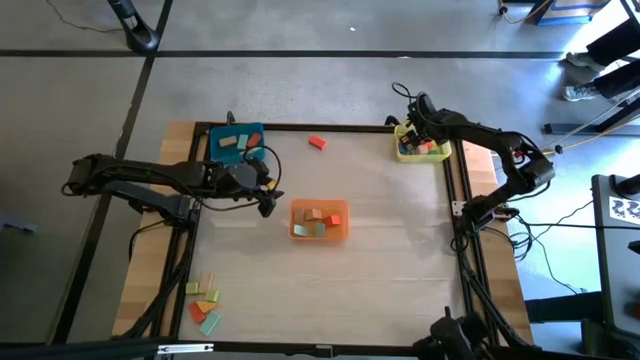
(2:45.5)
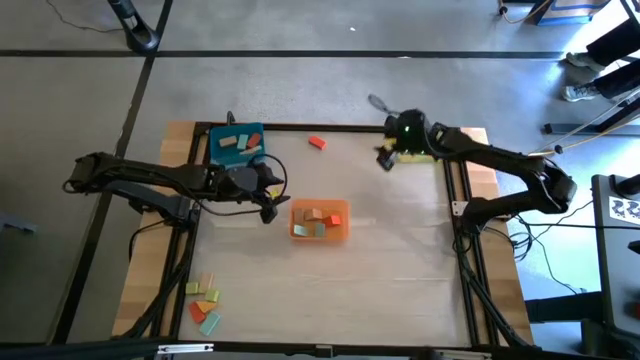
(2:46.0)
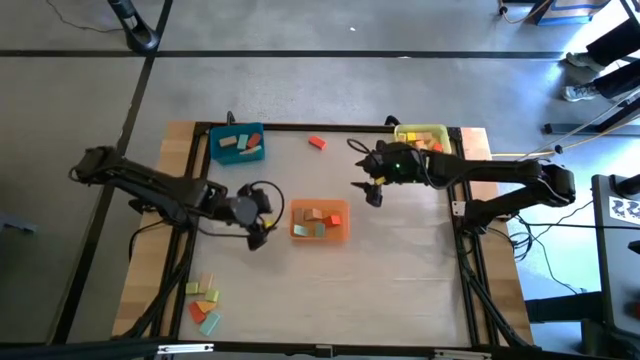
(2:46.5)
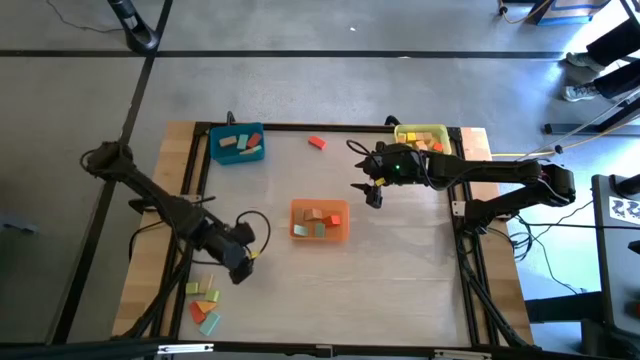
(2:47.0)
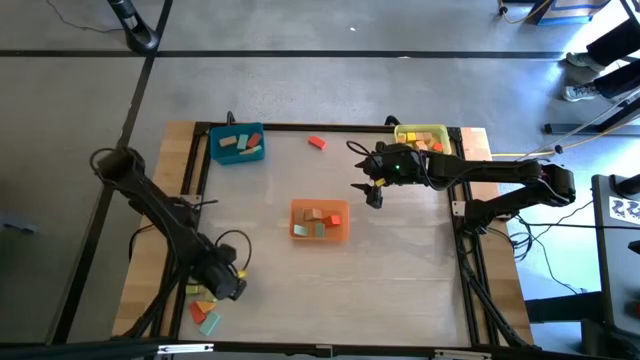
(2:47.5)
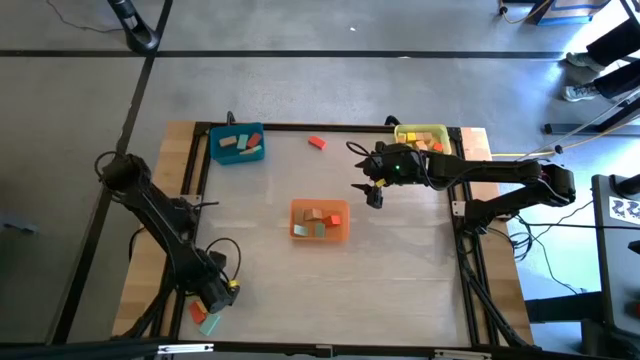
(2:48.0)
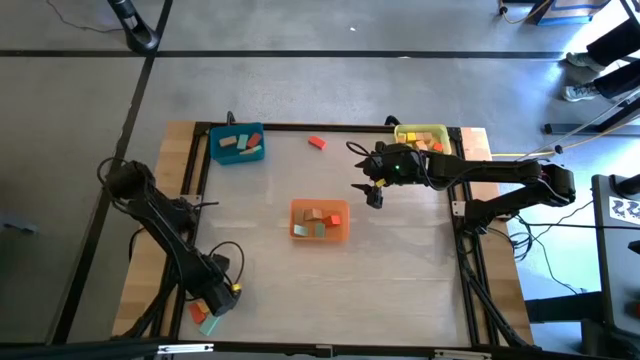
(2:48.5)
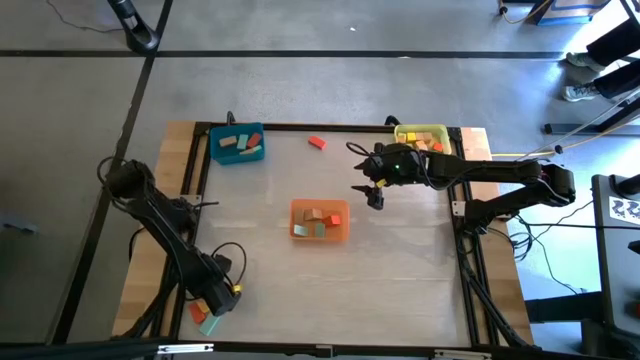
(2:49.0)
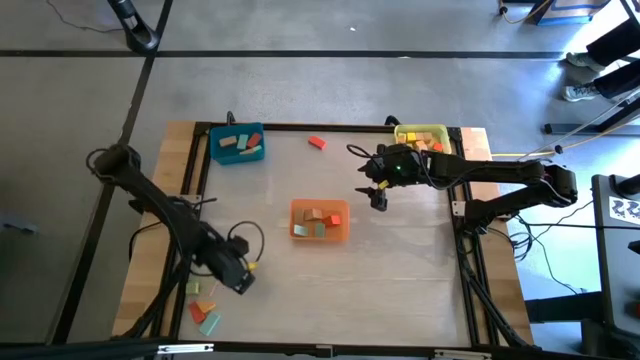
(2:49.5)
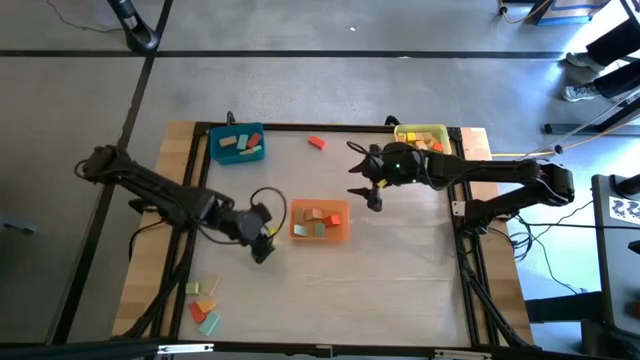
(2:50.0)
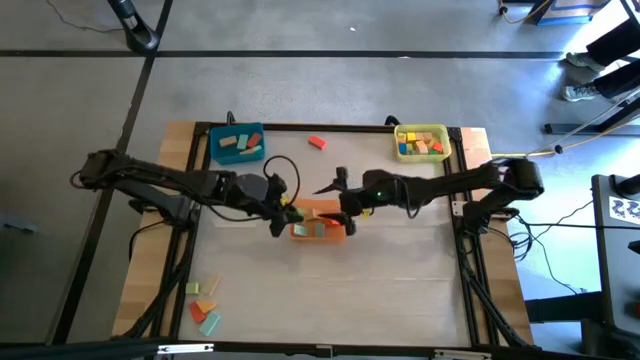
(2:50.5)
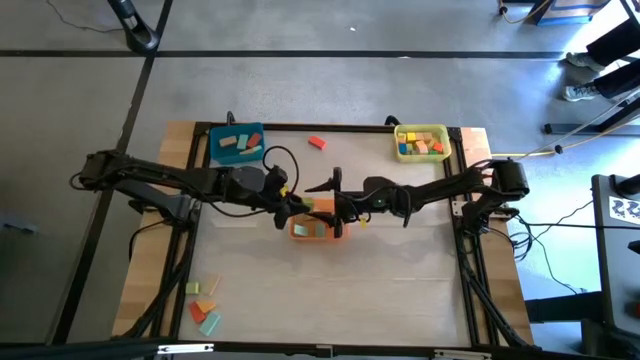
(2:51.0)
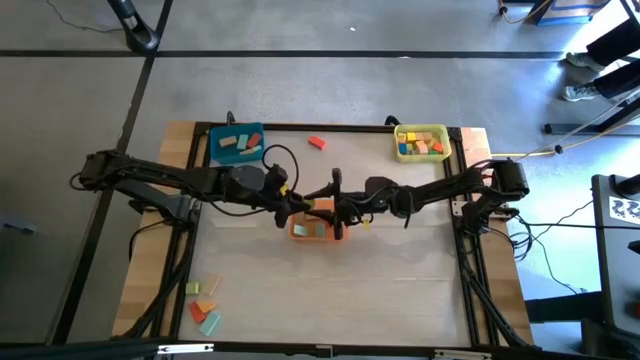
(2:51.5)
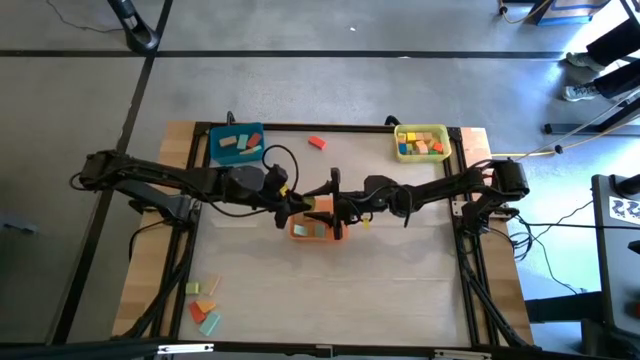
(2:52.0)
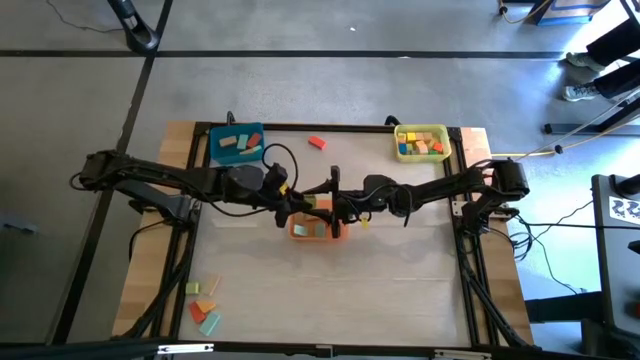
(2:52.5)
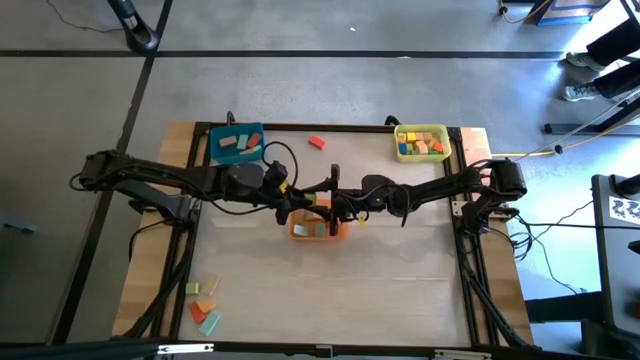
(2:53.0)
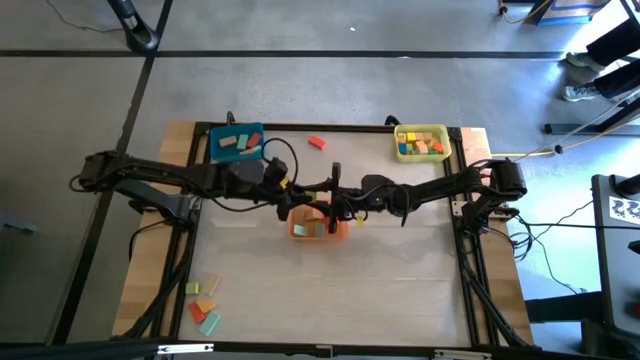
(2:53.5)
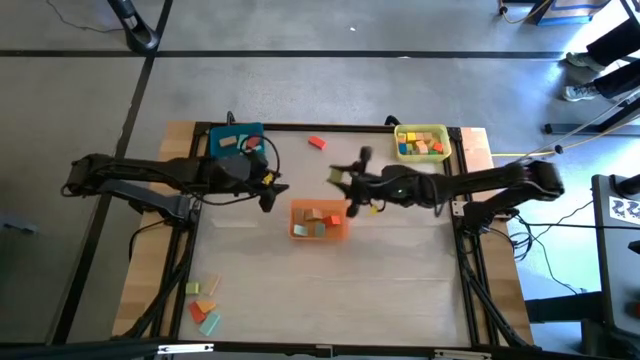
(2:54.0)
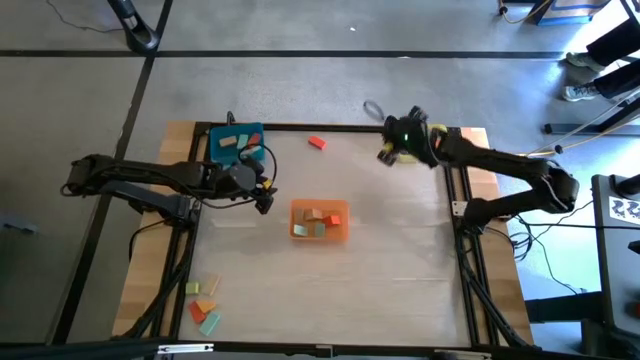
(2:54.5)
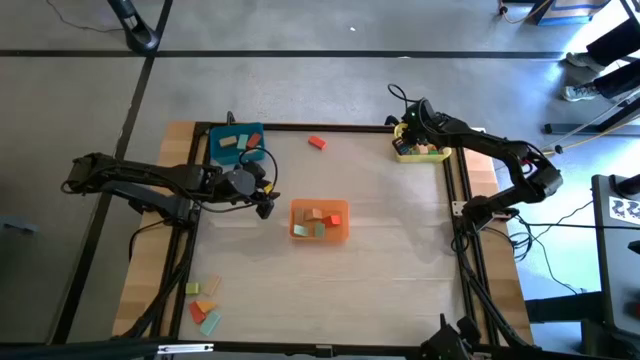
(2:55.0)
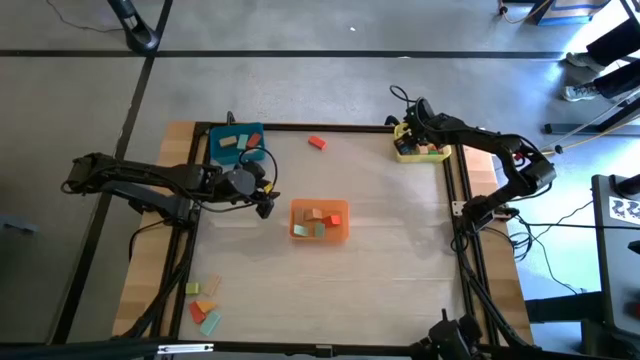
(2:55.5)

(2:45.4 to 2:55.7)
Task: Sort blocks by size
Put the light green cube block into the yellow bin

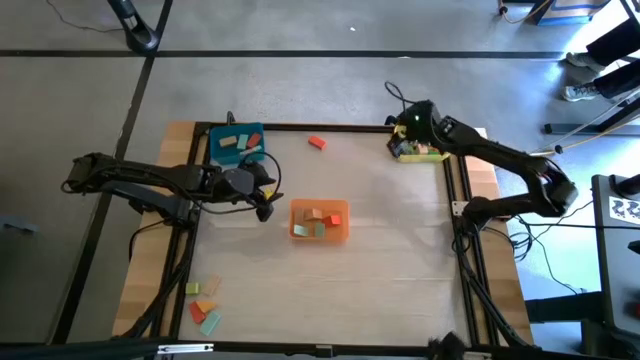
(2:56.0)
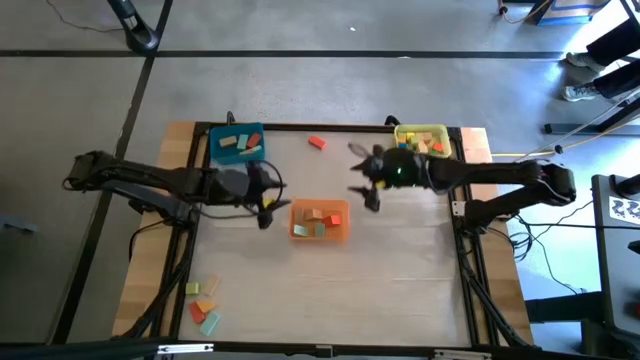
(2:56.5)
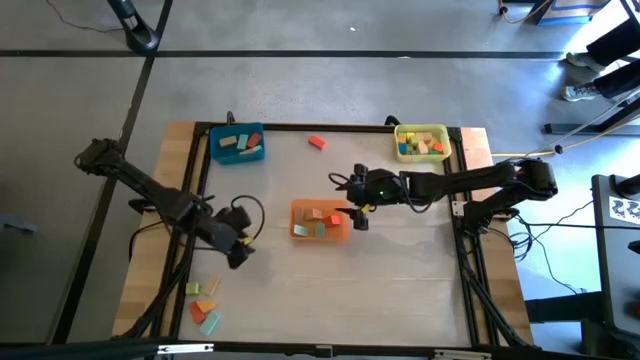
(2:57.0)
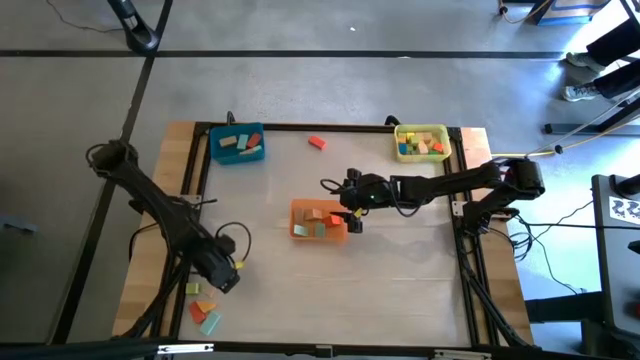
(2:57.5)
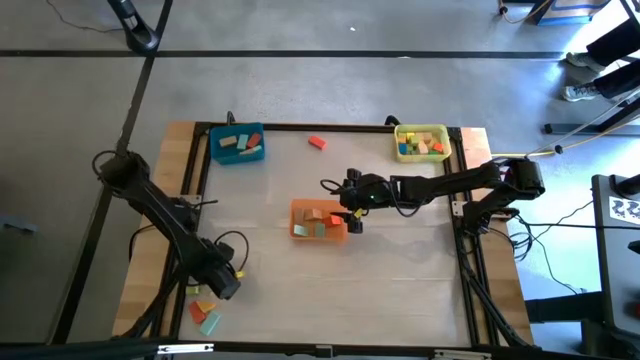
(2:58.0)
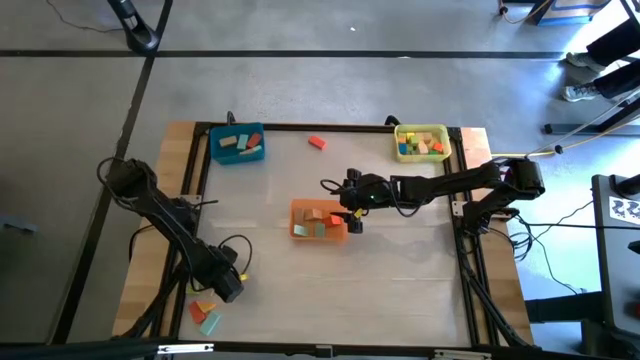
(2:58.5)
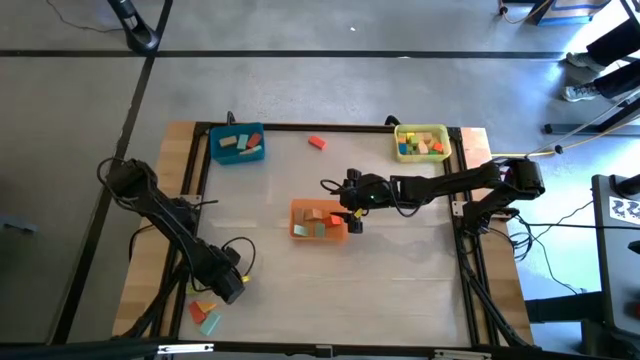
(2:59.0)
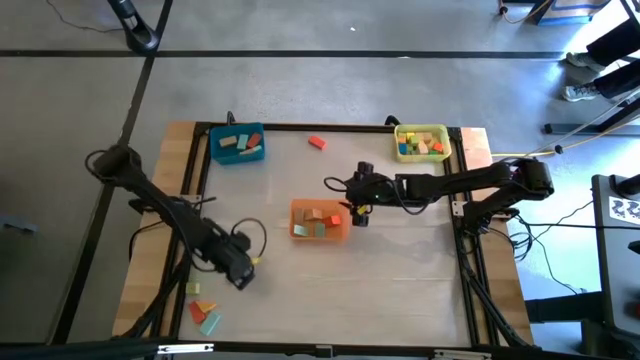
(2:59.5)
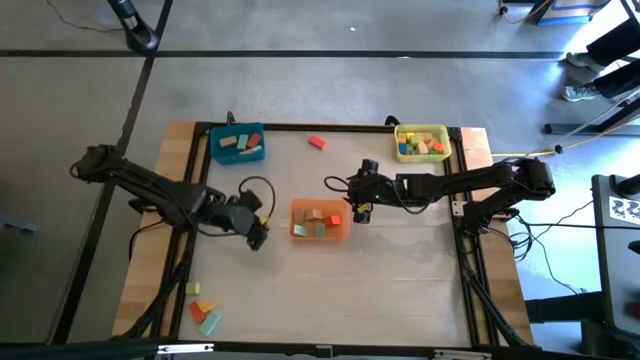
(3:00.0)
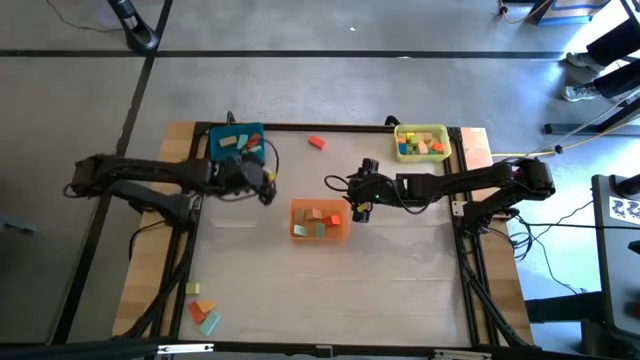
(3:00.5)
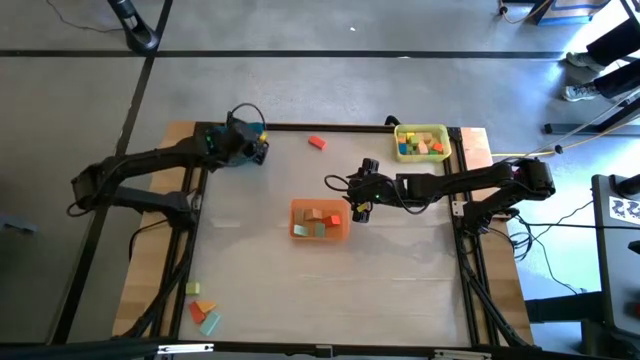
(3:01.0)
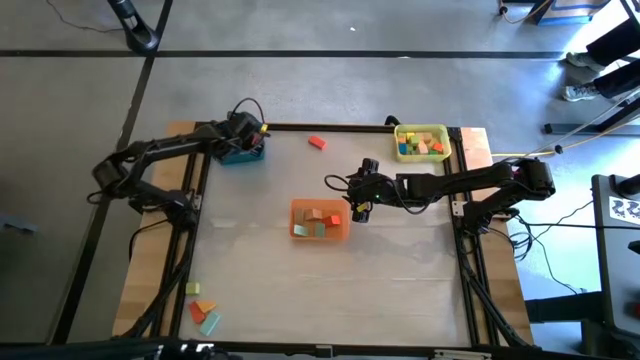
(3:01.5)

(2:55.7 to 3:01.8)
Put the brown rectangular block into the blue bin

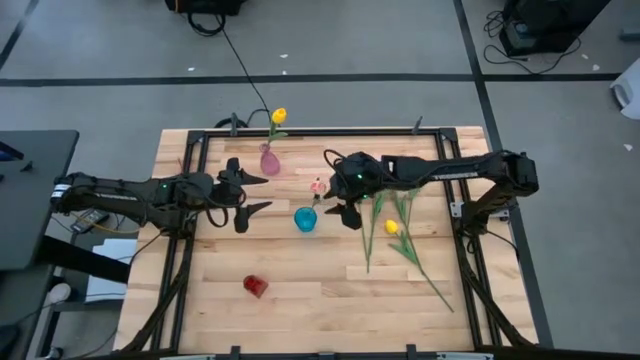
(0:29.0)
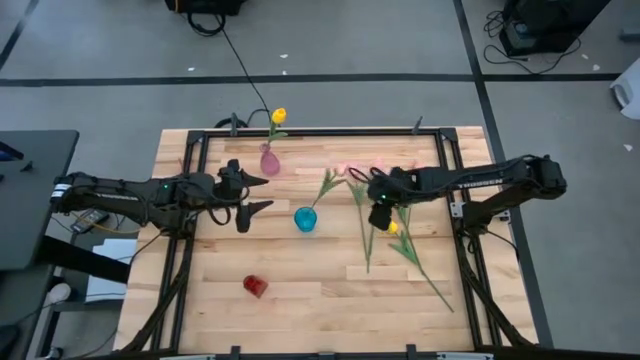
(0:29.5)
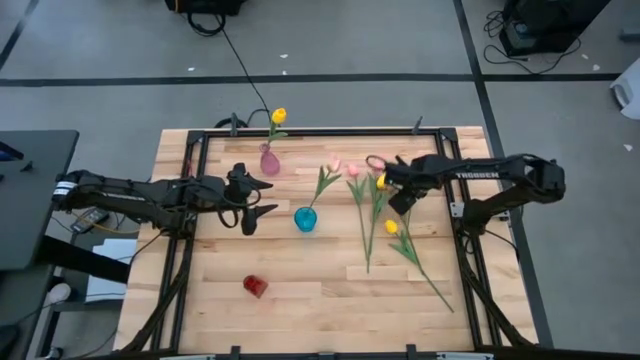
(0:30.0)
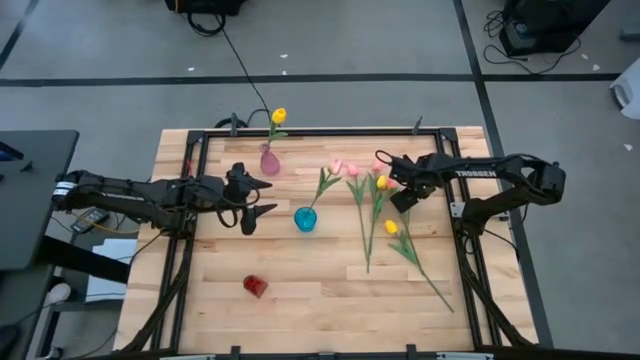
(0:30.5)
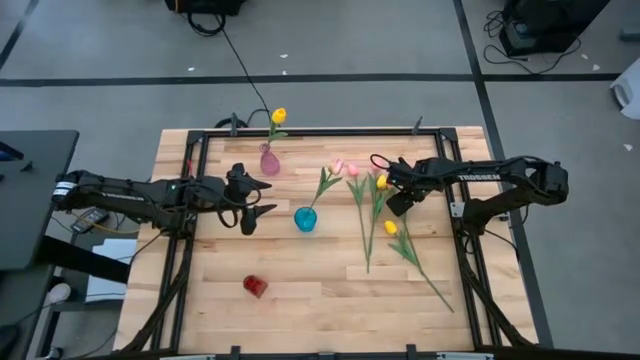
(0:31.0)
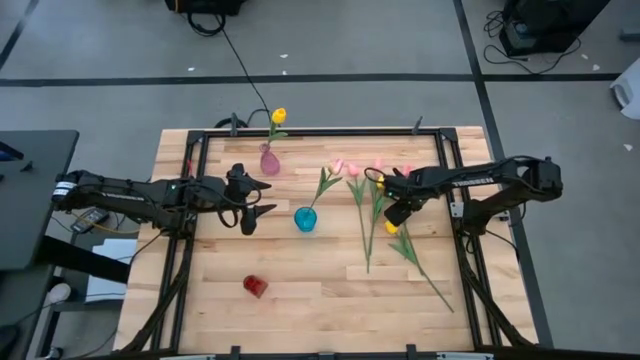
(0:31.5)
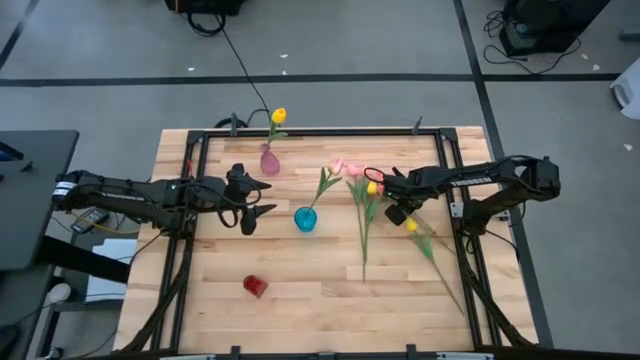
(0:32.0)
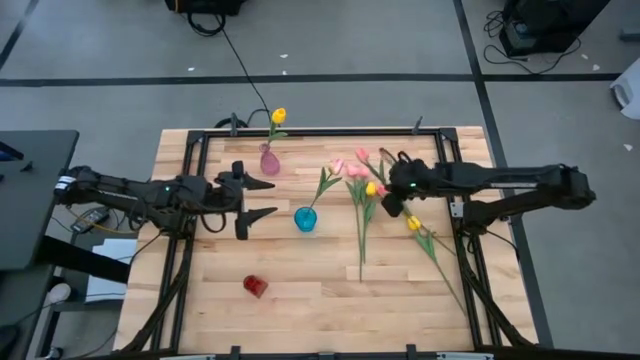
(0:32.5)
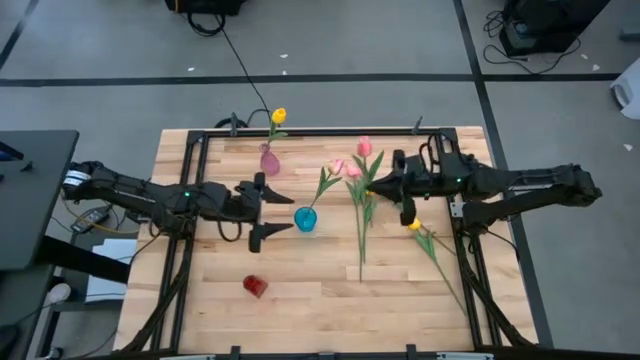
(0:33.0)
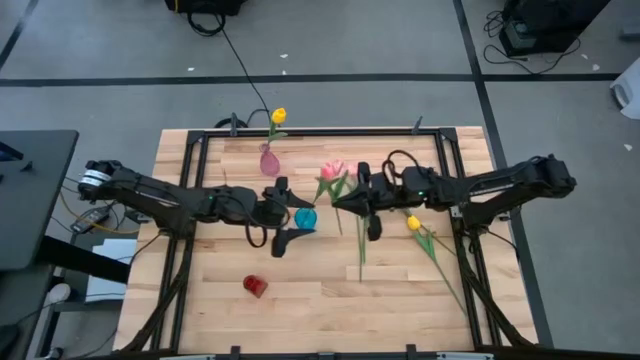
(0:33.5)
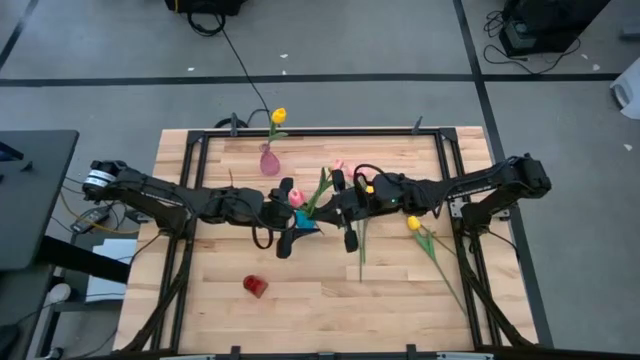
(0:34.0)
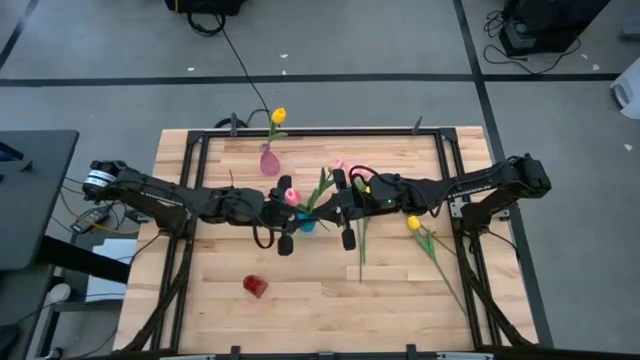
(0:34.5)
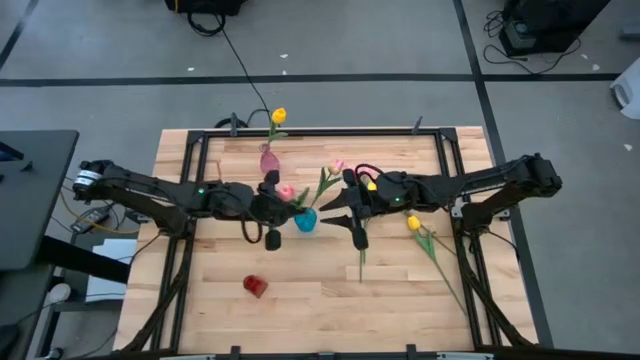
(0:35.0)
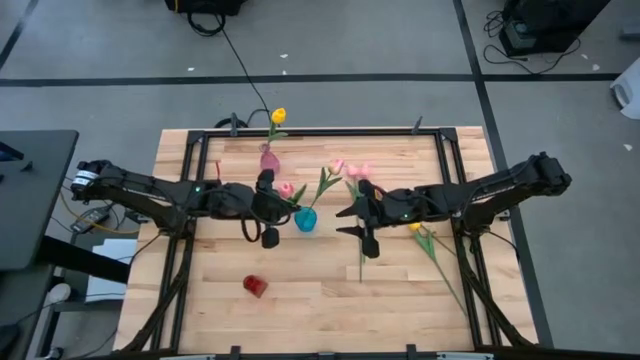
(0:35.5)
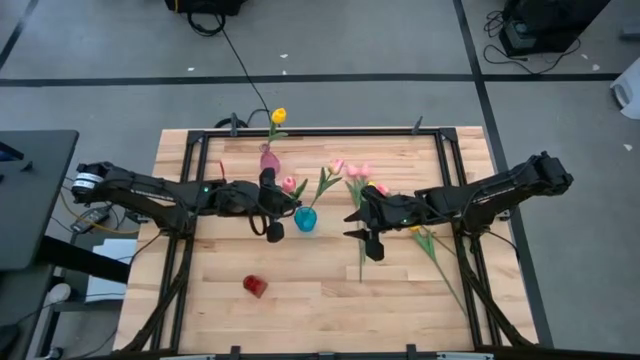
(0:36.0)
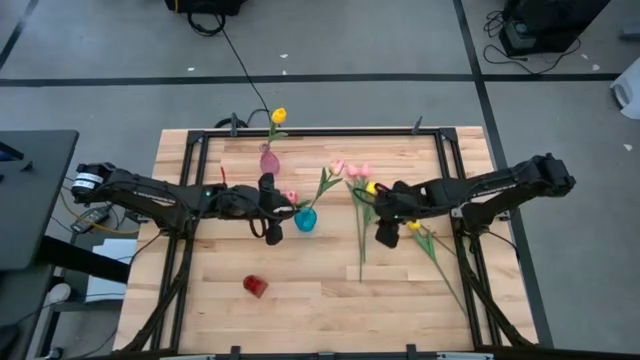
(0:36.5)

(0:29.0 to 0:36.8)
Task: Sort flowers into vase by color
Put the pink flower into the blue flower vase
